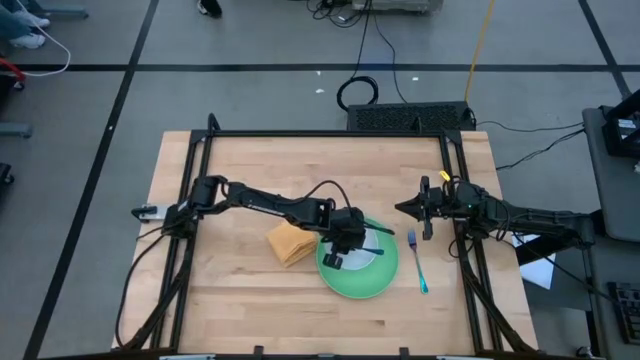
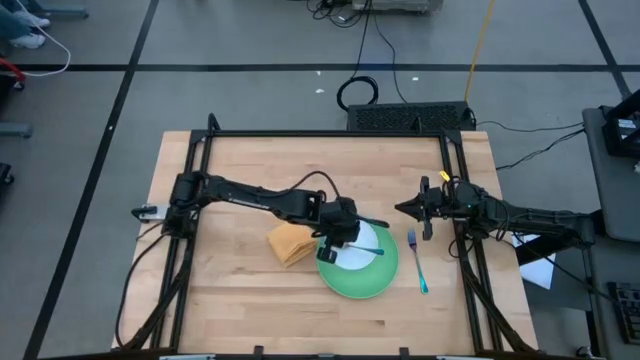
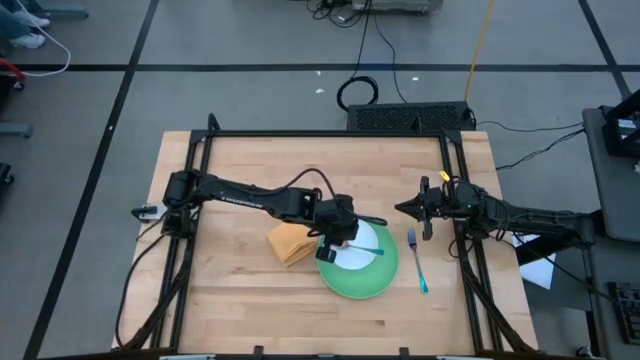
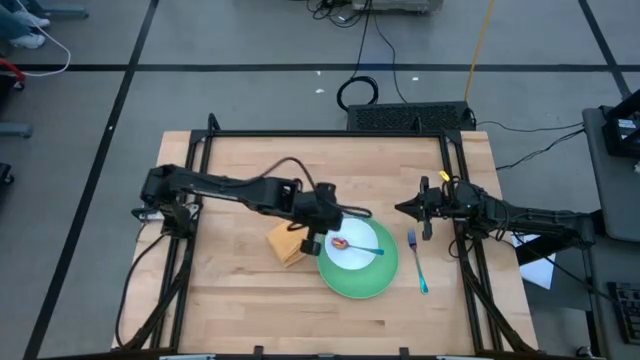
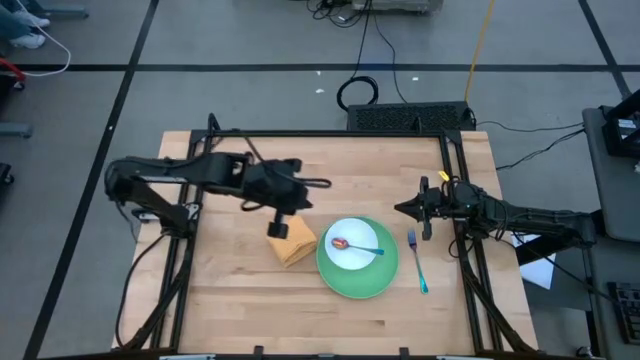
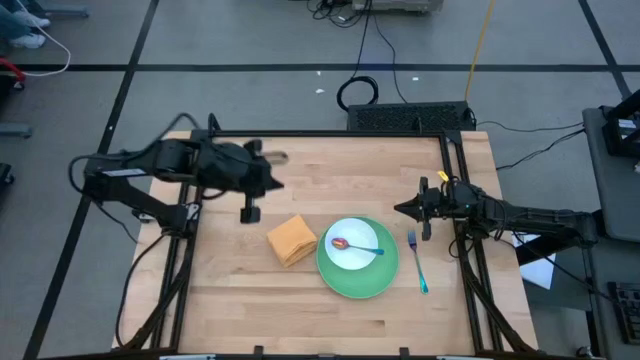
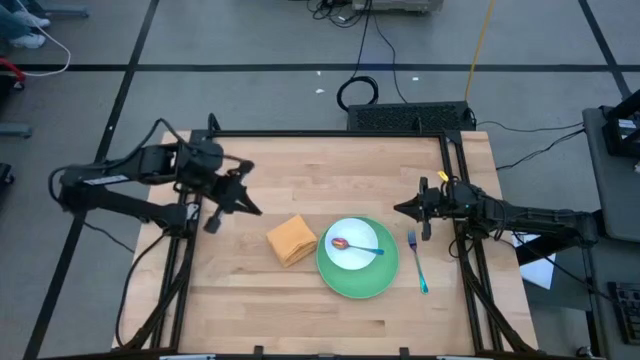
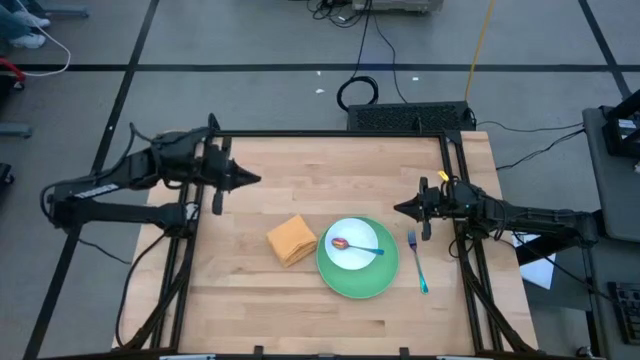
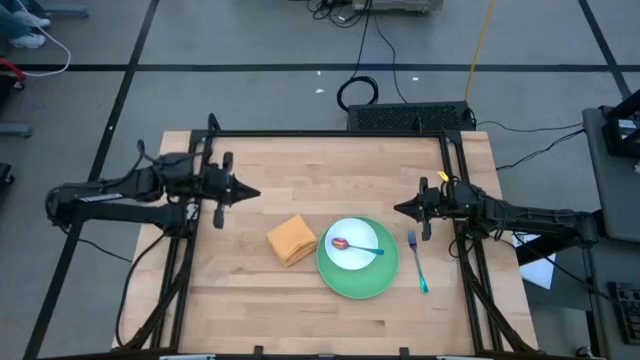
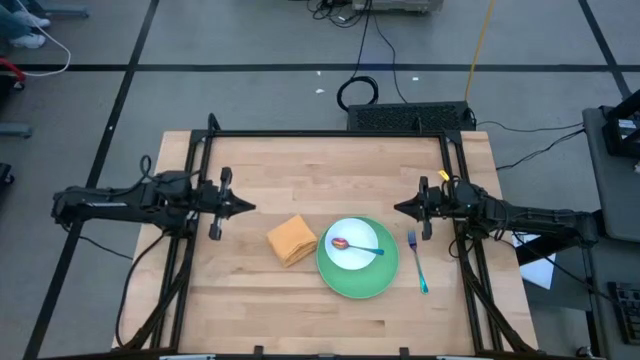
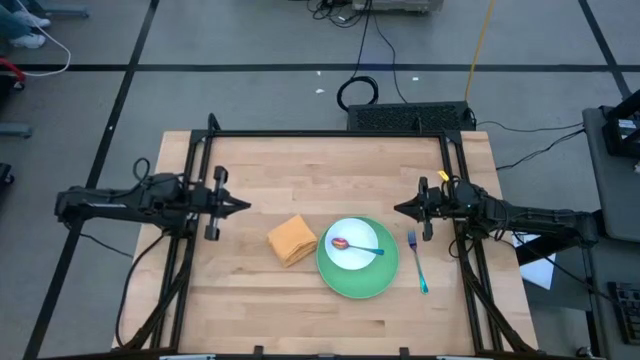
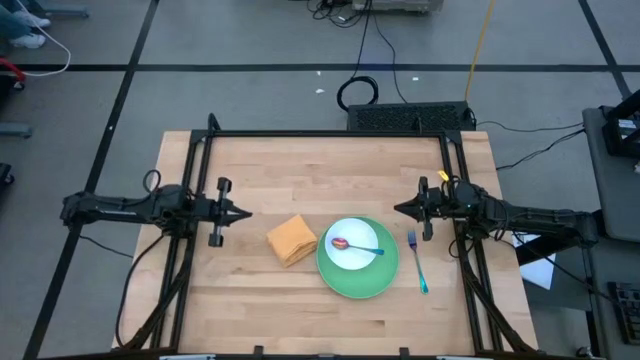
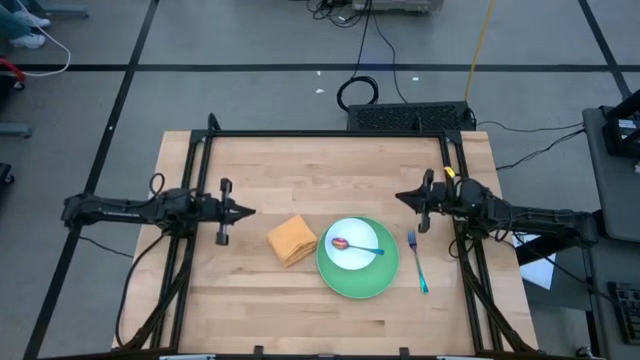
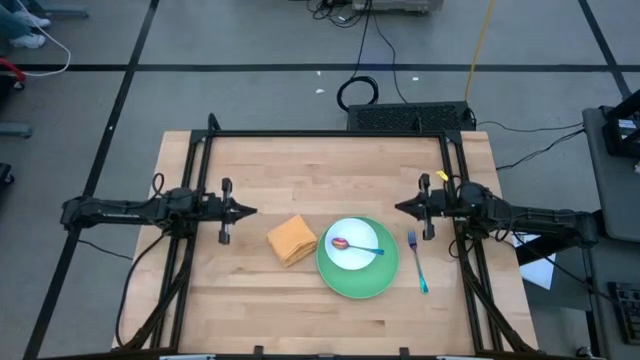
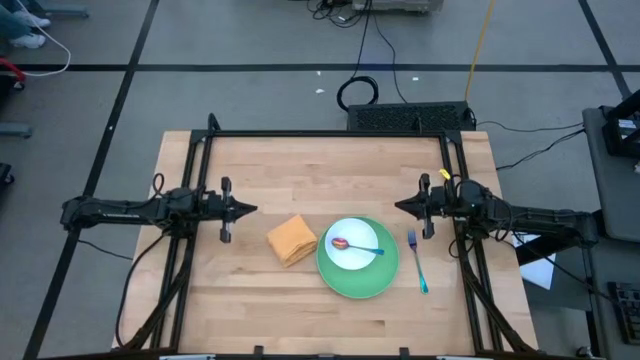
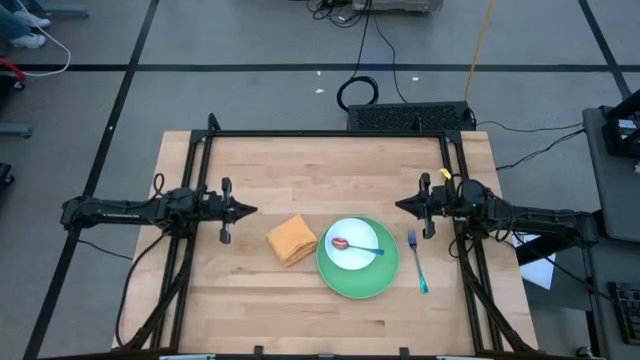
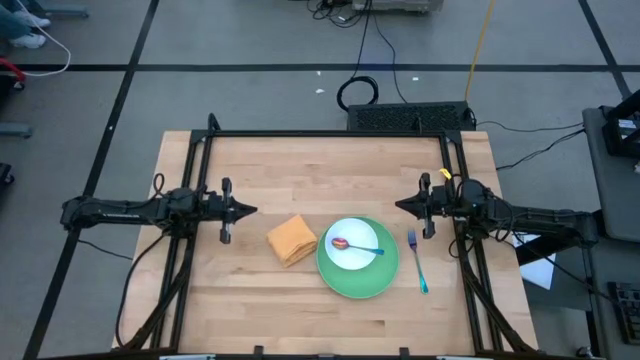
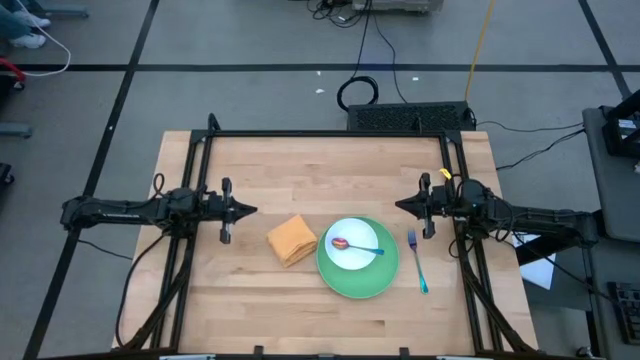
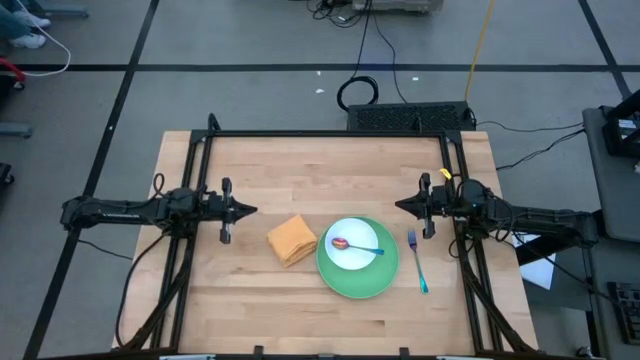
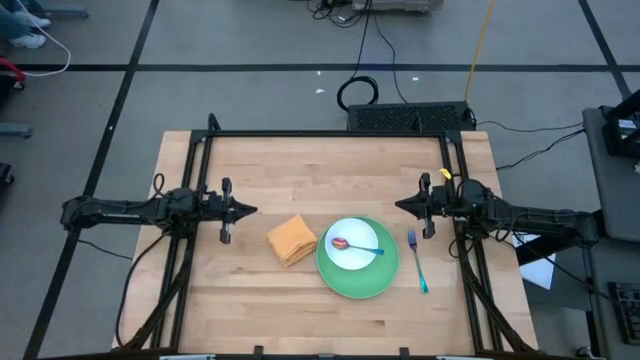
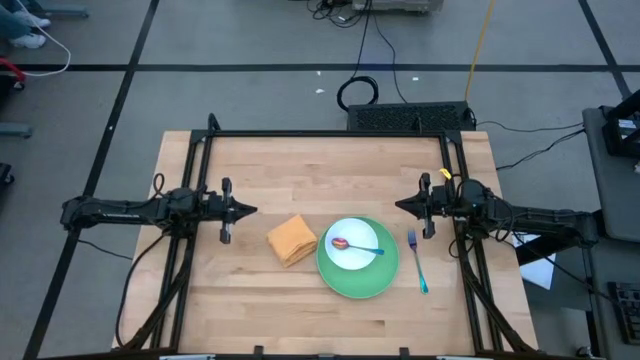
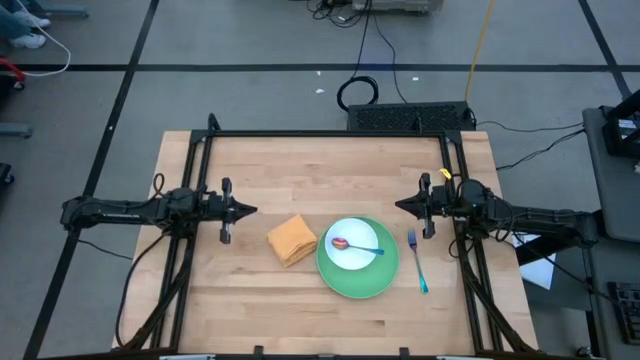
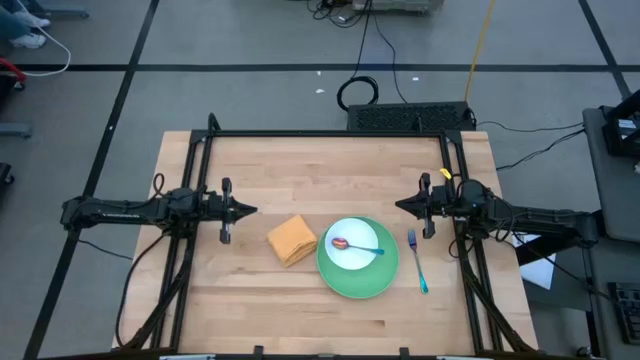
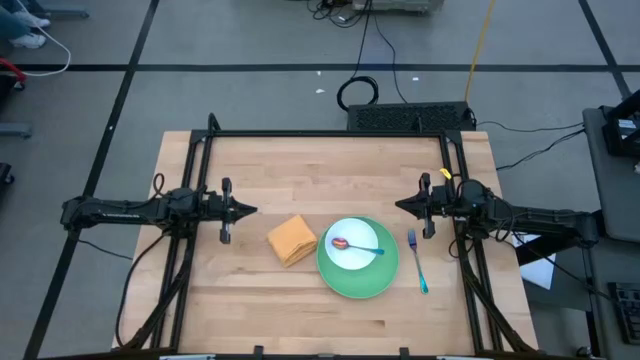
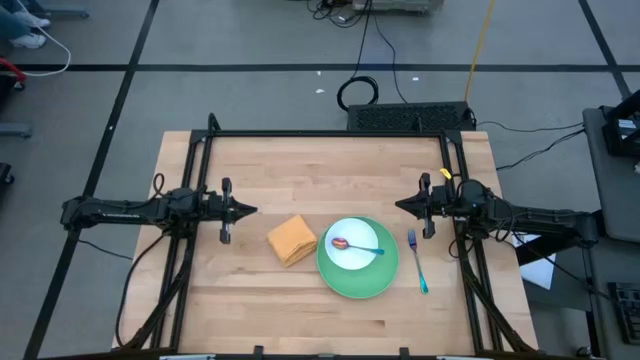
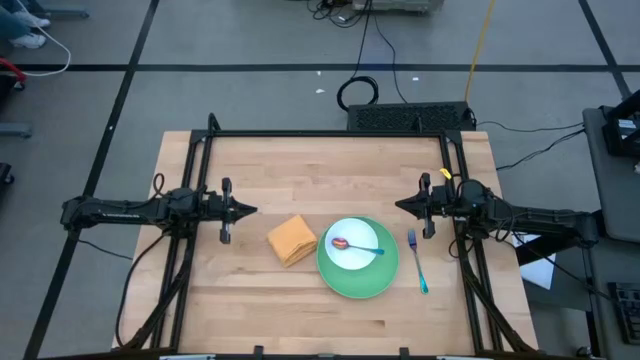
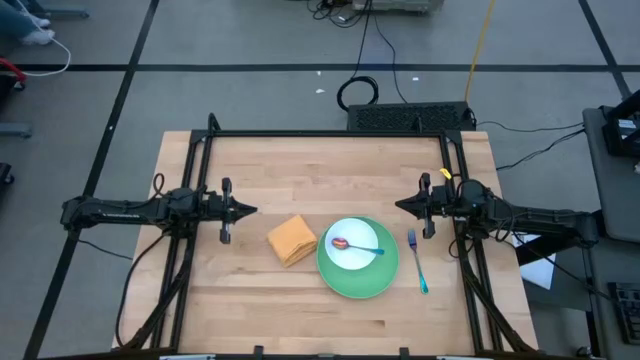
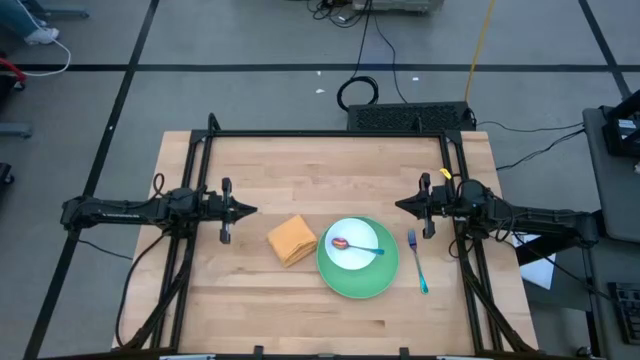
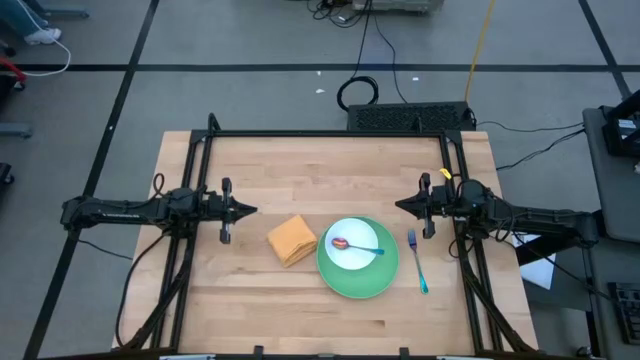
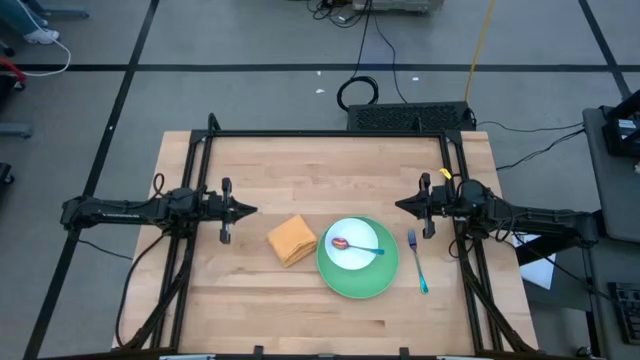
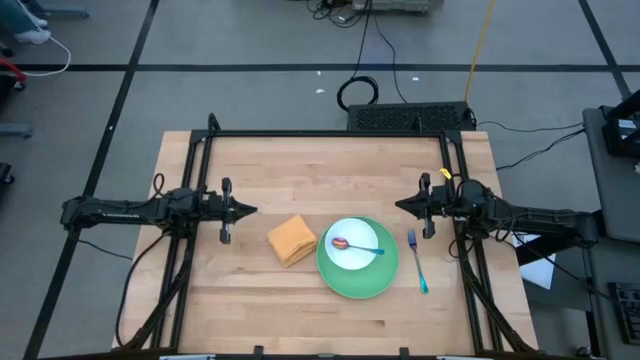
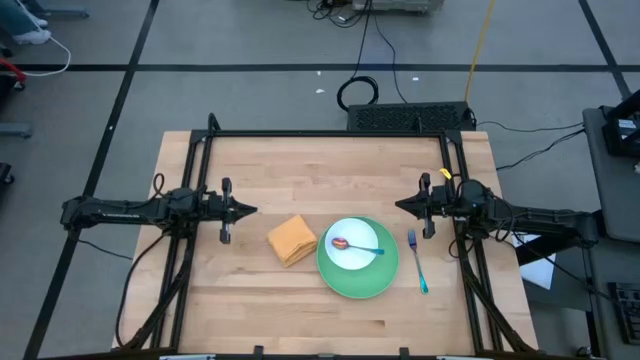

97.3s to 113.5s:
Task: Set table place
Return to Home Position

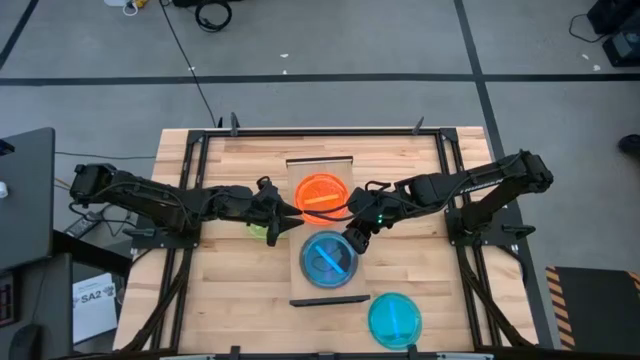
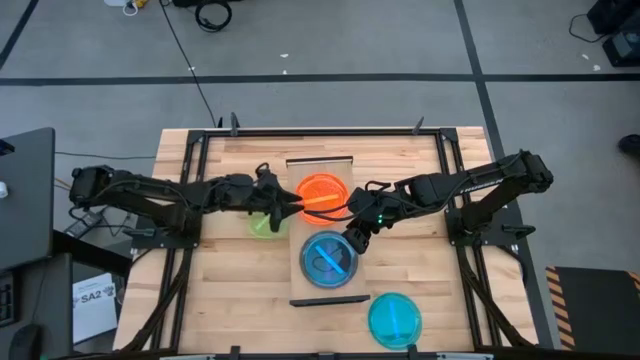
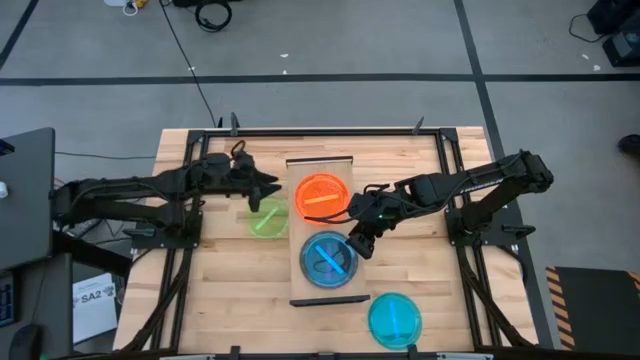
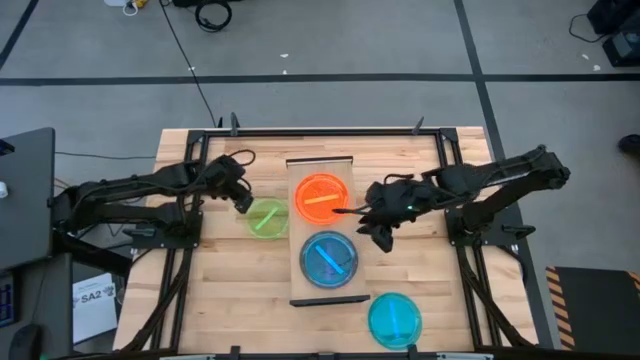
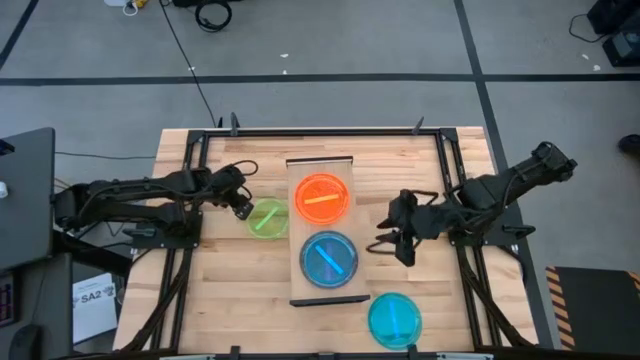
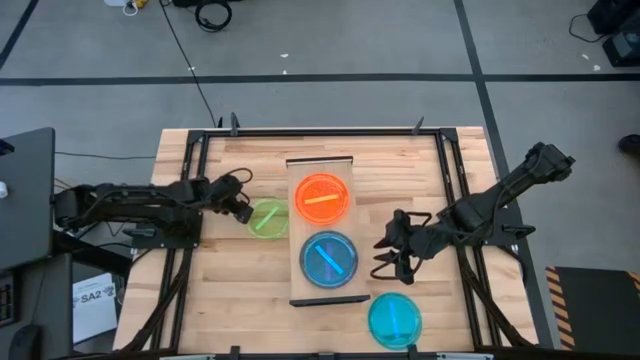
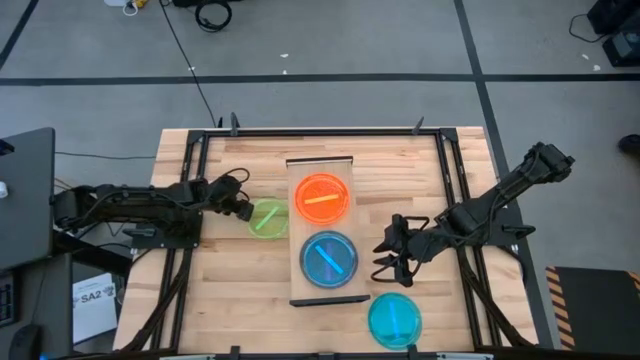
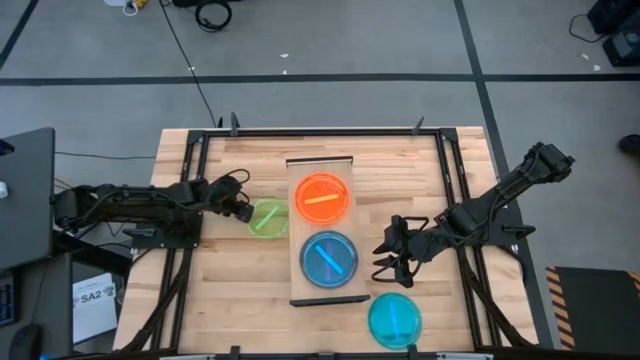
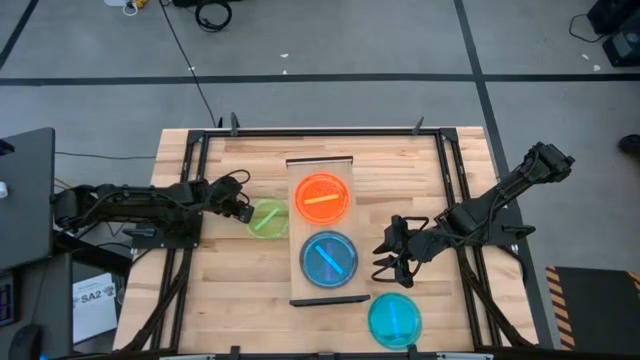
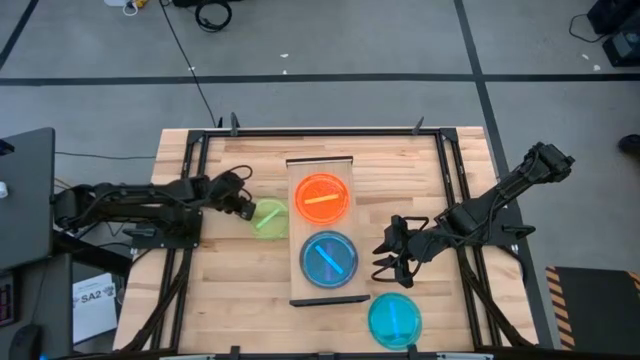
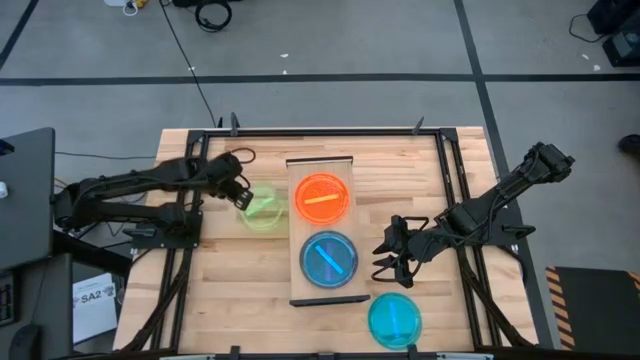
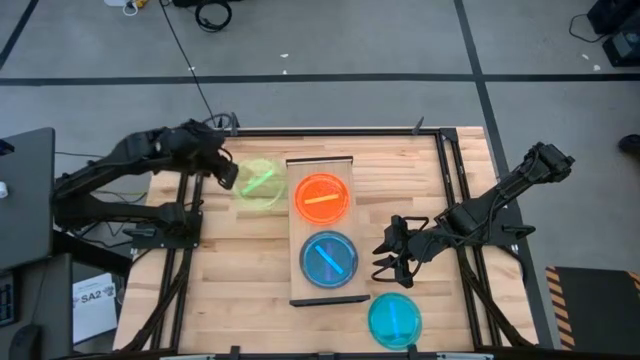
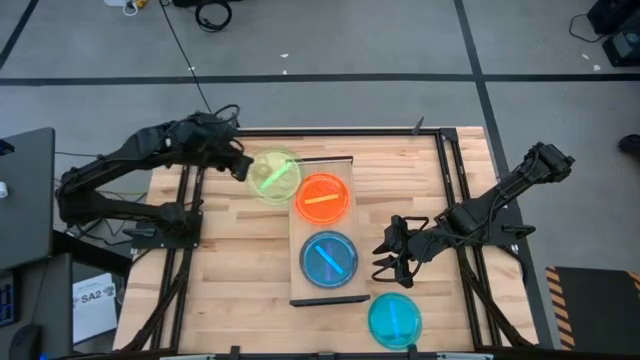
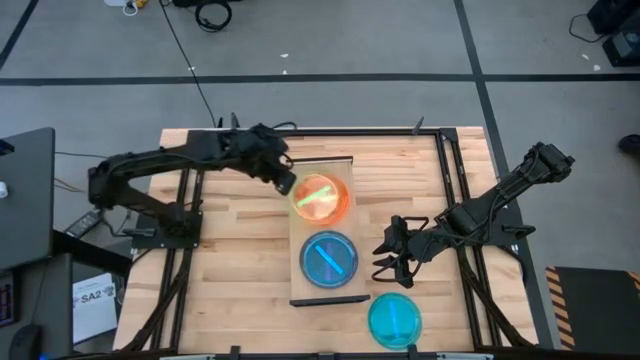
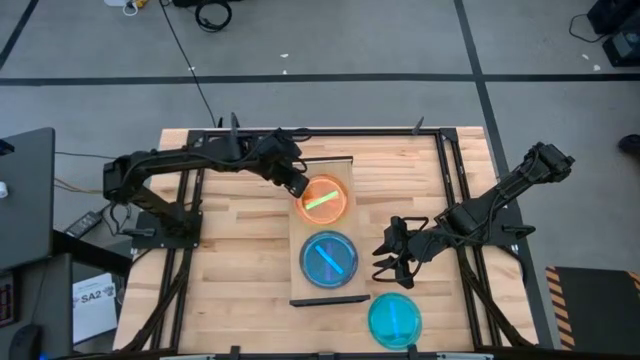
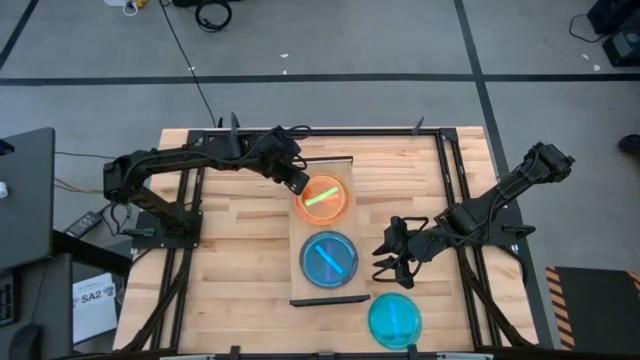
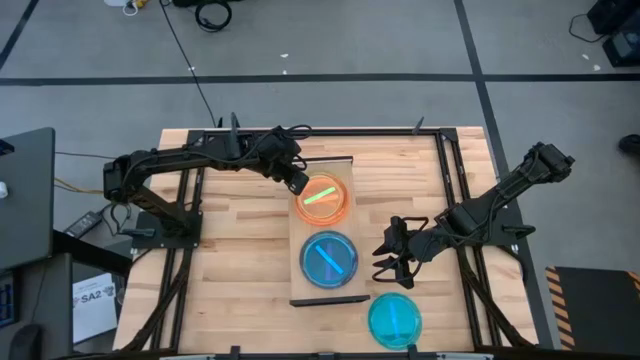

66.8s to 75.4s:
Task: Place and stack plates onto a shelf
Stack the green plate on top of the orange plate on the shelf
